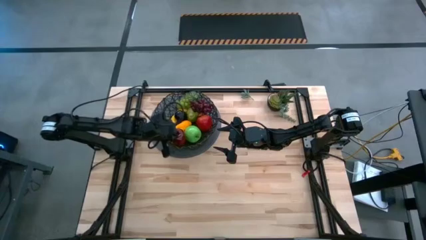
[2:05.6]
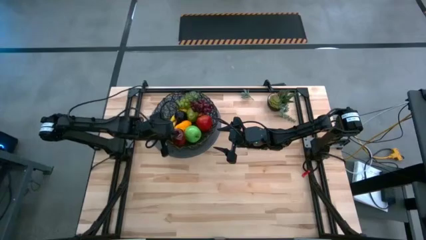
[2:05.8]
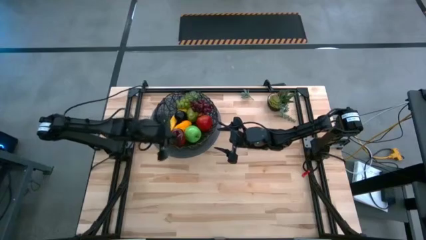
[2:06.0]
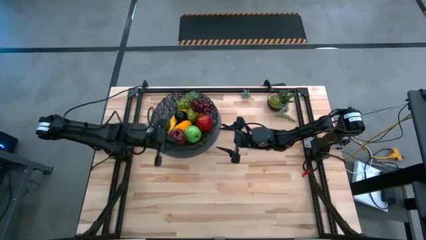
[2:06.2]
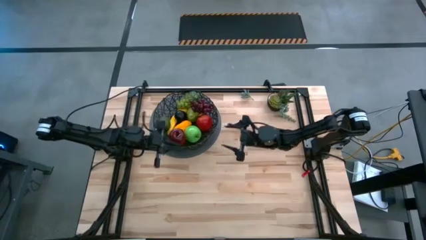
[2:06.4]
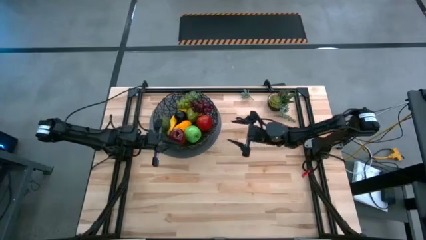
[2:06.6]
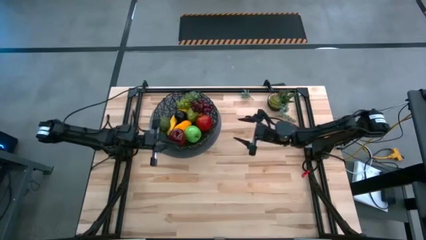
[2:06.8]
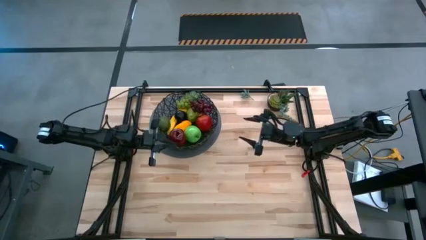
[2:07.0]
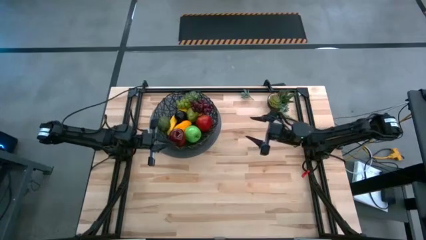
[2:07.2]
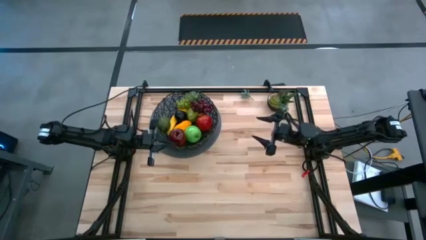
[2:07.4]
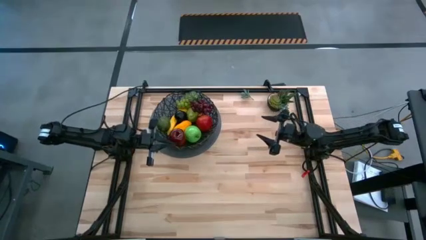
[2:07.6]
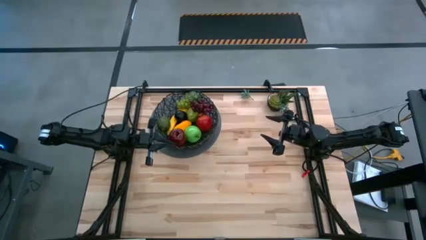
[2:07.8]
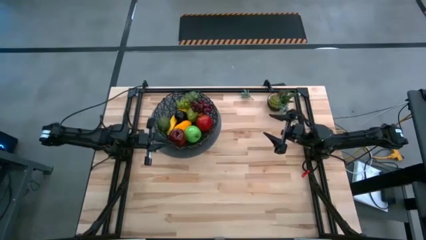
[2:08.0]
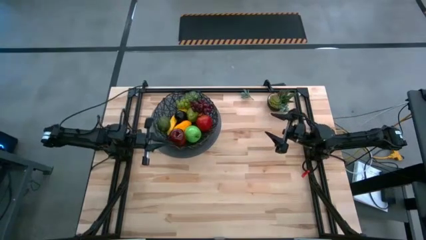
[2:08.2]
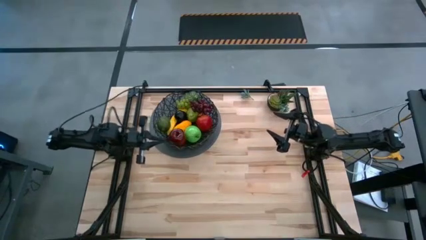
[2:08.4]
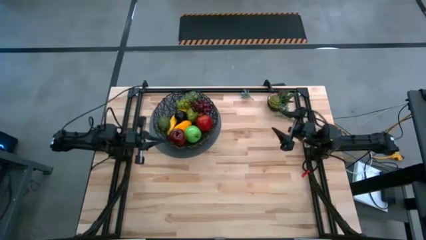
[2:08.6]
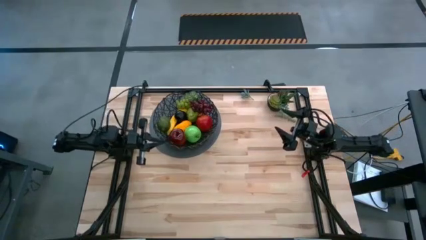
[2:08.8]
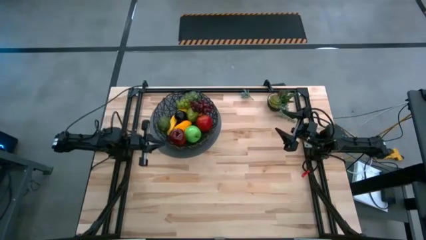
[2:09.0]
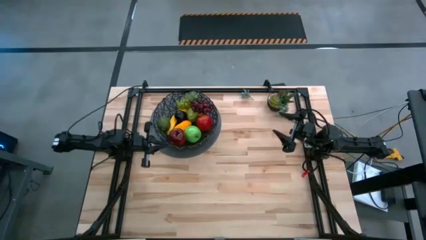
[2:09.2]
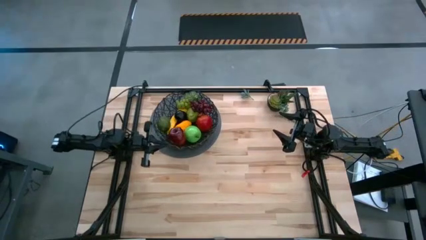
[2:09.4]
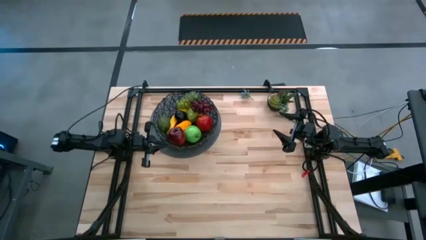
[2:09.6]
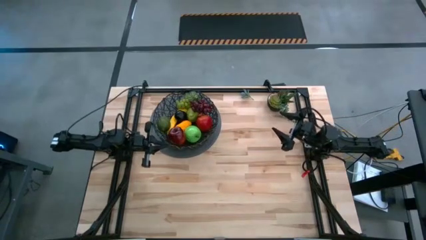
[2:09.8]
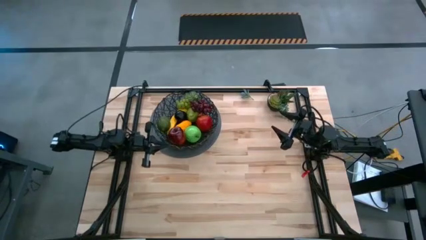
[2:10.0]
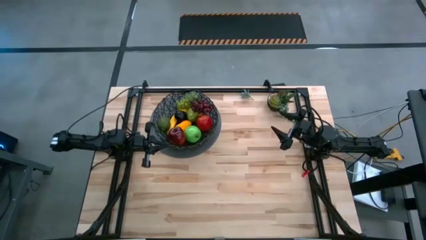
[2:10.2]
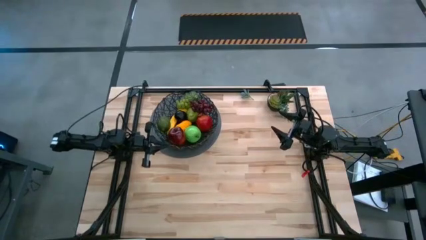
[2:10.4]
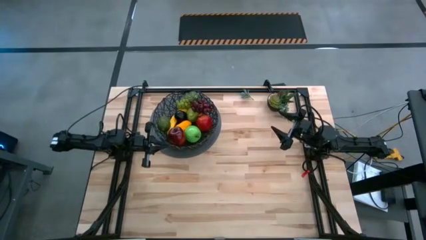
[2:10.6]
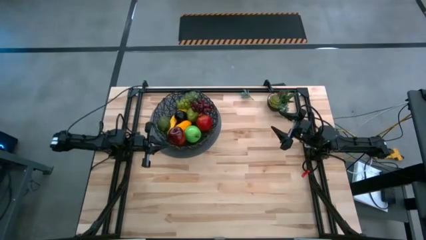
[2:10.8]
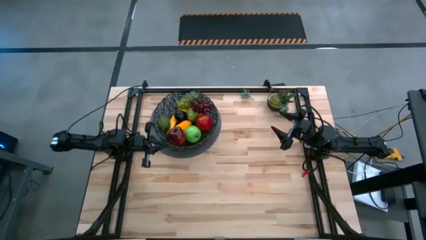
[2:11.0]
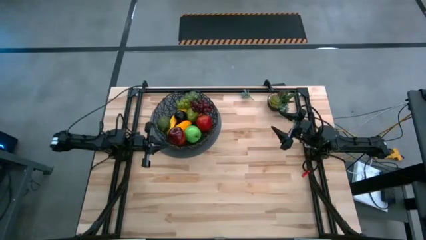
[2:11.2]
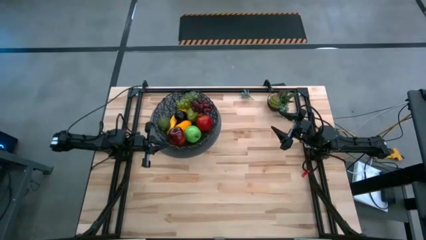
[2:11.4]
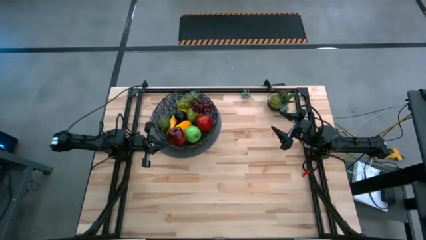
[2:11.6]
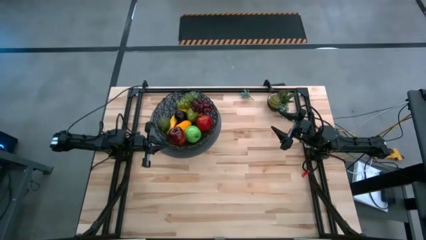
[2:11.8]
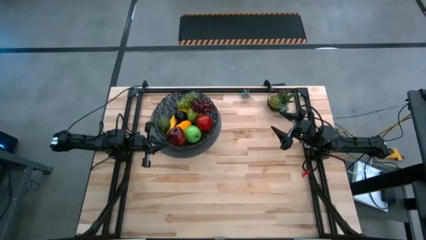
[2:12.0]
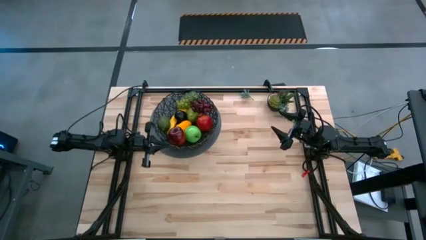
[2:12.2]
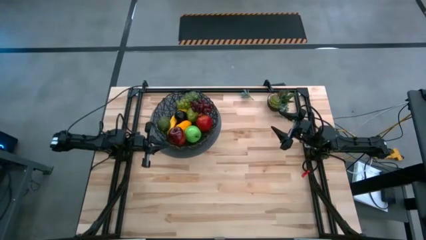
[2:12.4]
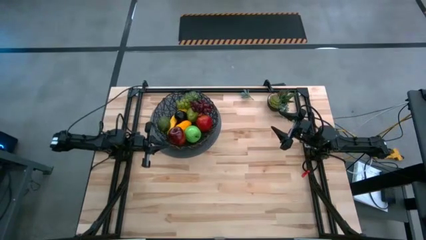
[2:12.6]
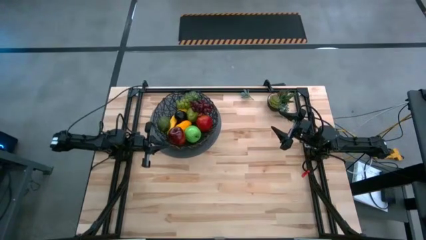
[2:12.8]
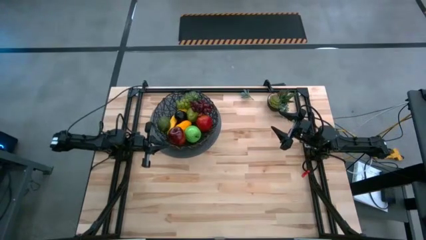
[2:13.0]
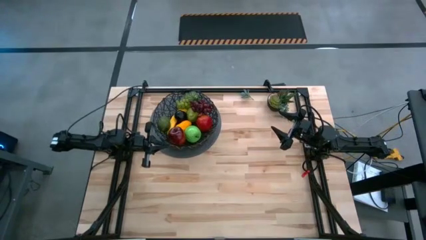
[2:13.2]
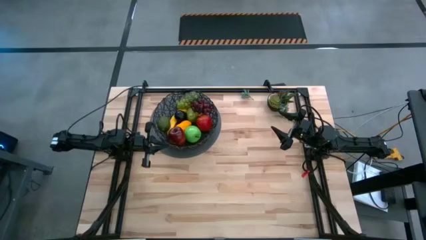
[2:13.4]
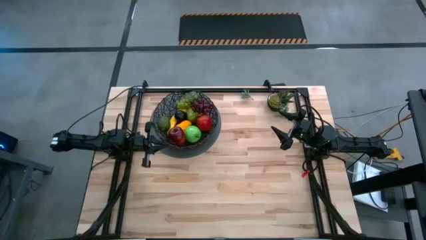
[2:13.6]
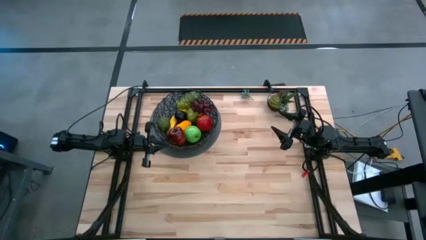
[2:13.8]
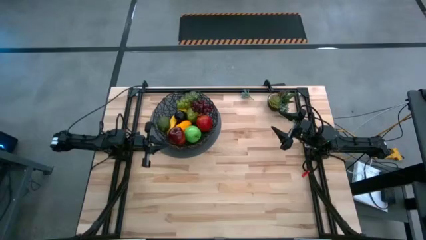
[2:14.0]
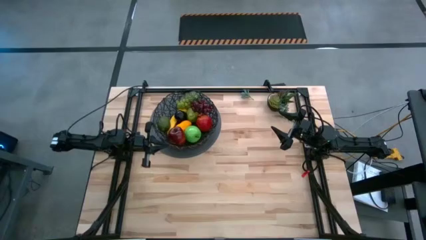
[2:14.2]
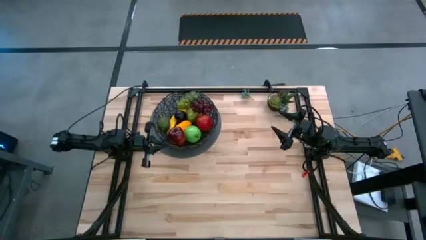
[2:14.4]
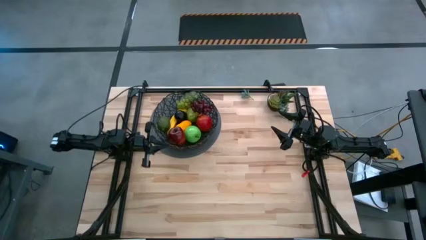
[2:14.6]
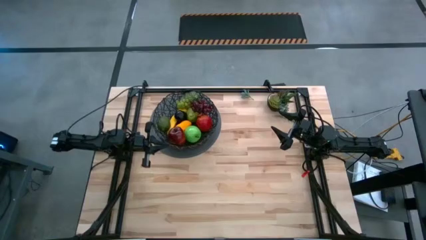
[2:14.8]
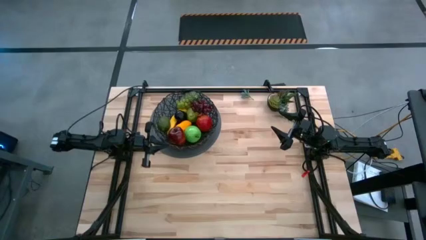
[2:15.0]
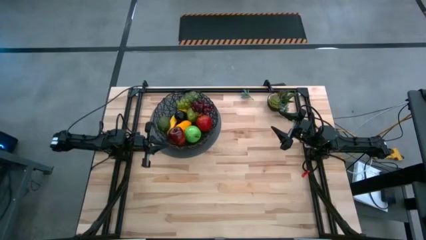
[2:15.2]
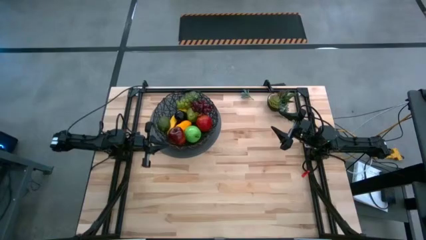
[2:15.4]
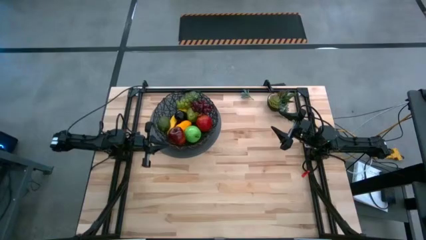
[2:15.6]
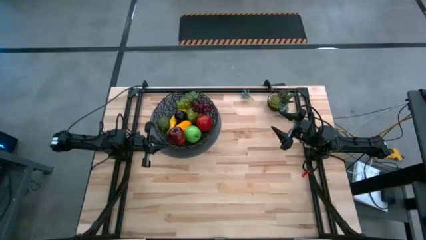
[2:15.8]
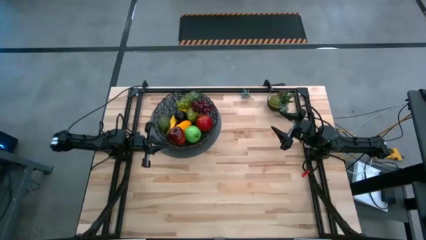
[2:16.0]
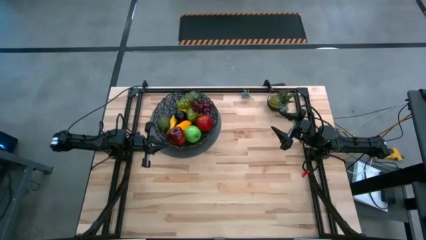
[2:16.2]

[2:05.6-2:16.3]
Task: Build produce basket
Return to Home Position

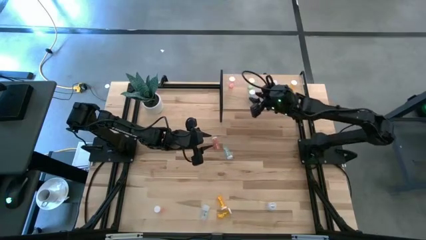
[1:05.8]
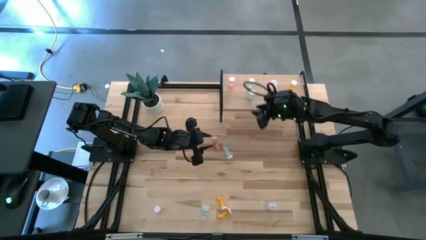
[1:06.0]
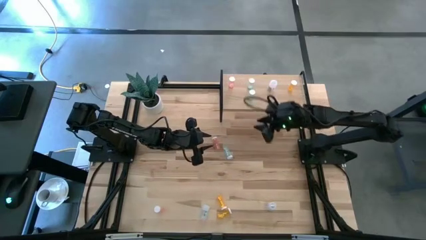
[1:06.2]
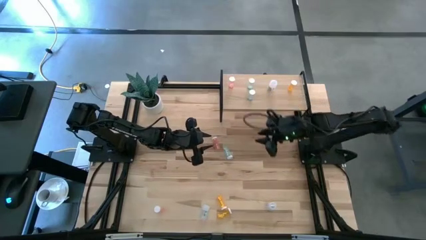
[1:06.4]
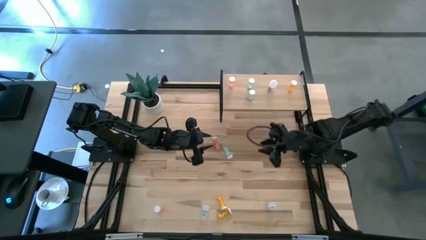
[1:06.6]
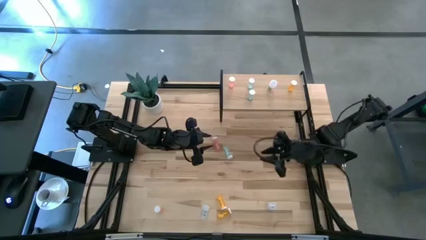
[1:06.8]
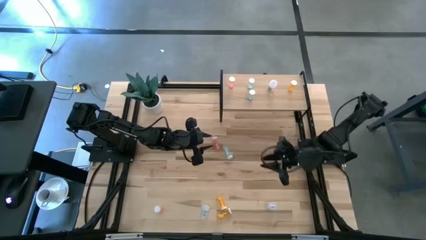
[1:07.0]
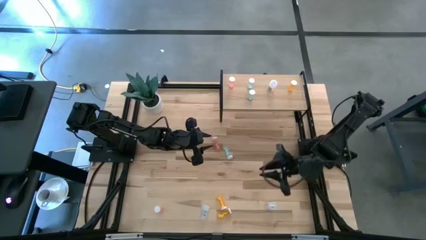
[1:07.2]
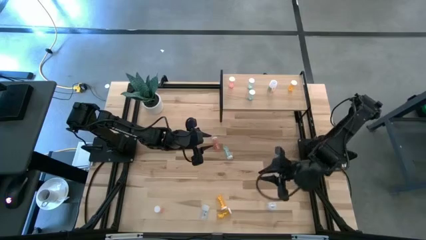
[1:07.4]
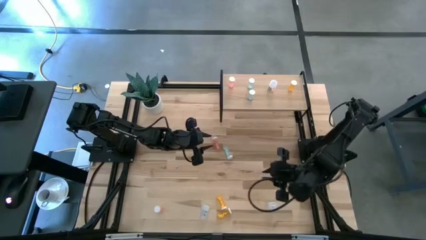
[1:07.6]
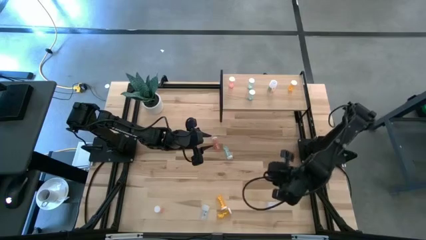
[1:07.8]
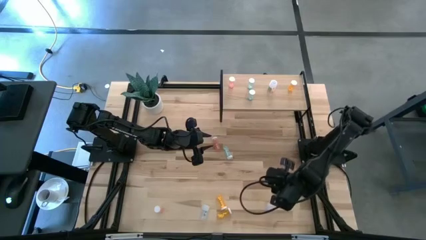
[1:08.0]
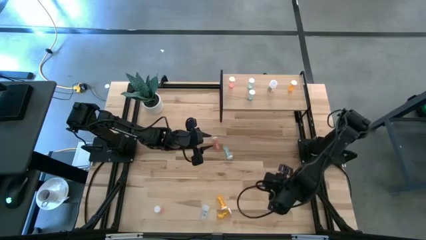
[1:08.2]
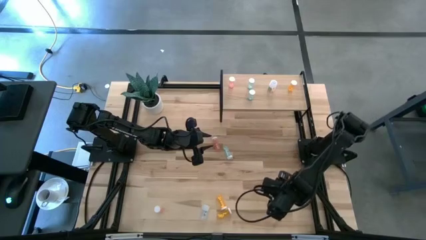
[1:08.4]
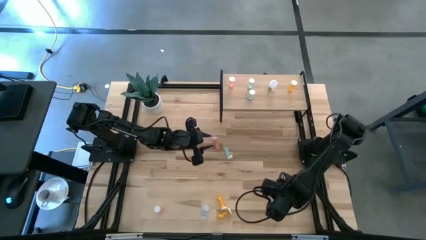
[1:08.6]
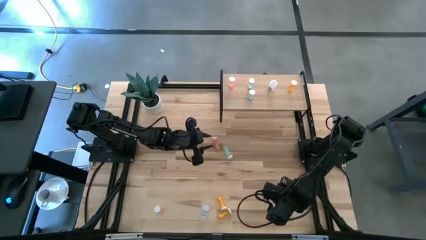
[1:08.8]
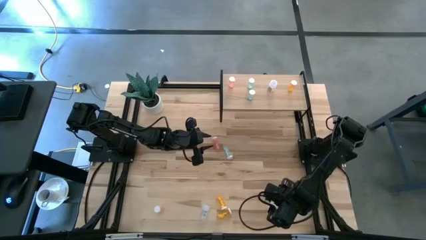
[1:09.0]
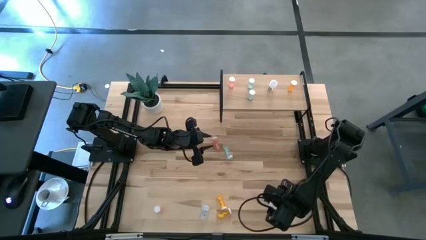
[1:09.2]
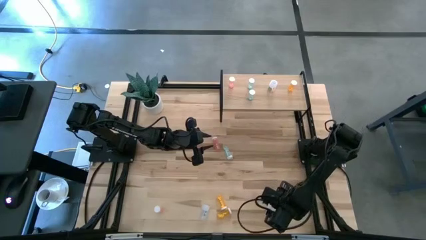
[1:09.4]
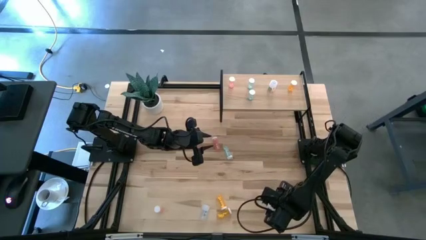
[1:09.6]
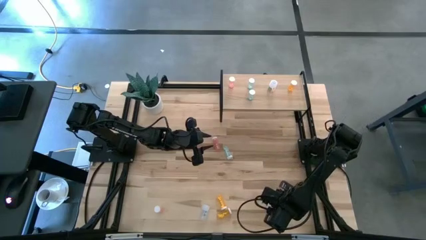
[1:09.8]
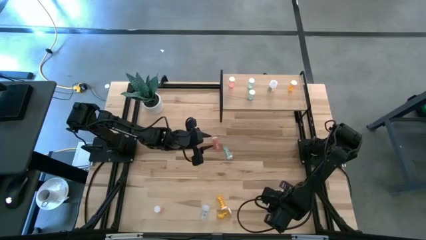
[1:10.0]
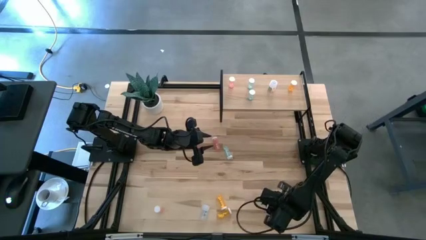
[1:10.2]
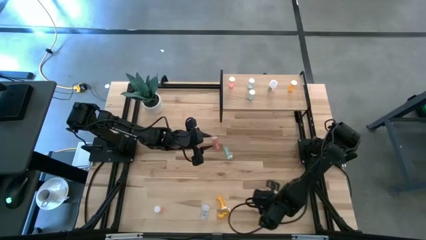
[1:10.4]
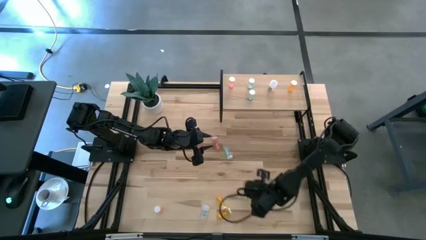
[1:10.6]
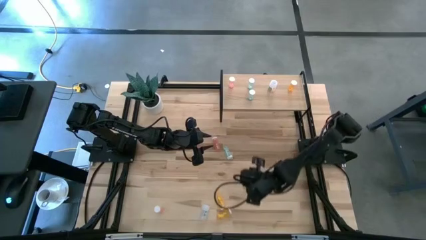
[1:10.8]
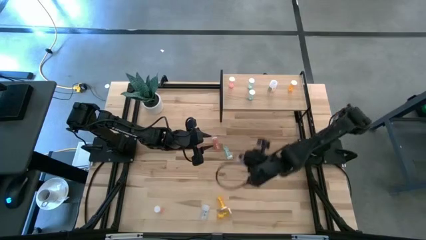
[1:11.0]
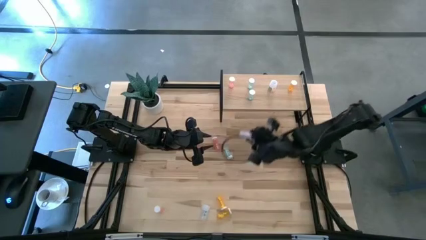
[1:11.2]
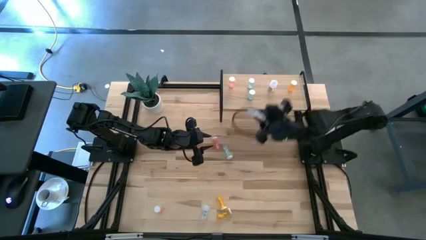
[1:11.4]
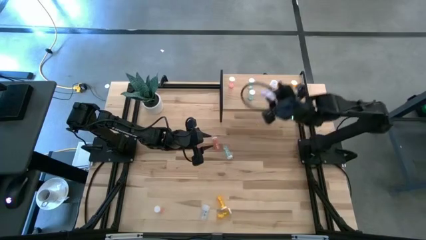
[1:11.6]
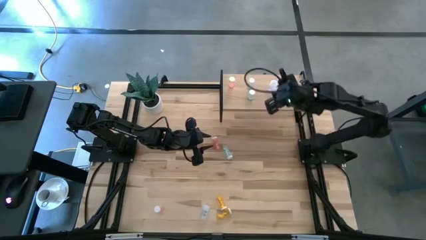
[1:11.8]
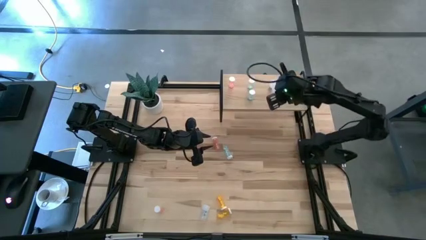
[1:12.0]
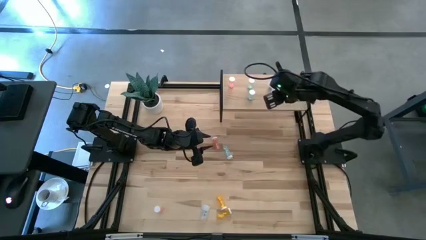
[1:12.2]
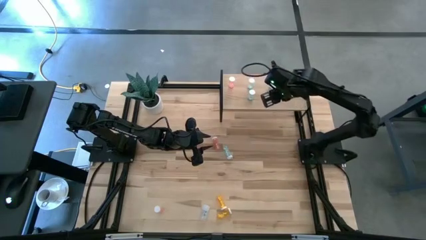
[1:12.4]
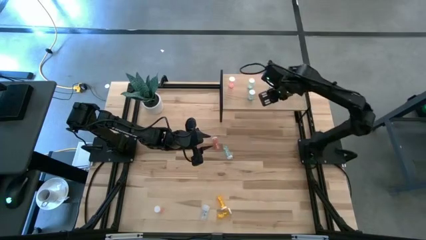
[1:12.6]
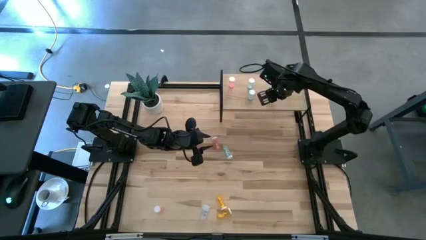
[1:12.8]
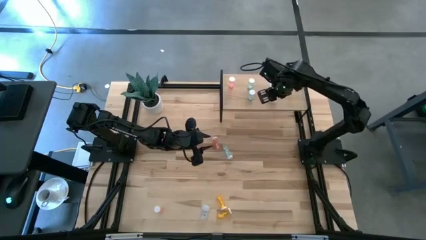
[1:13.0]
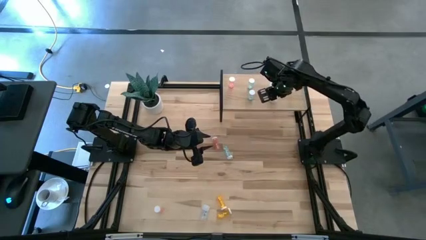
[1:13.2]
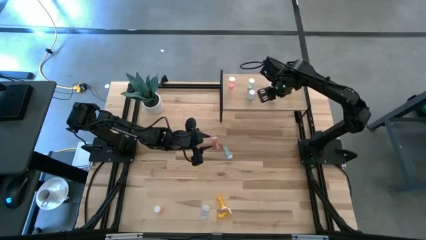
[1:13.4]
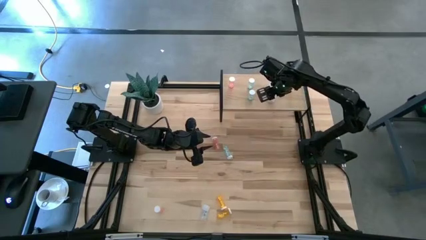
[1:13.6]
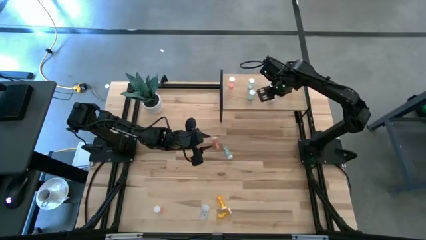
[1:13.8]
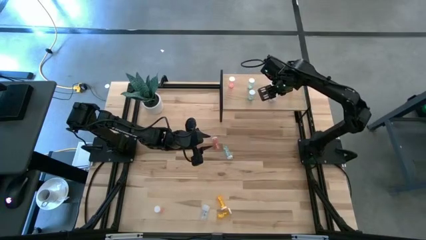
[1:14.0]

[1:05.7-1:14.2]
Task: Pick and place medicine bottles onto shelf by color
Put the right transparent pill bottle on the shelf aligned with the other transparent pill bottle
